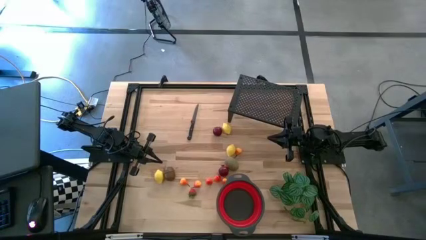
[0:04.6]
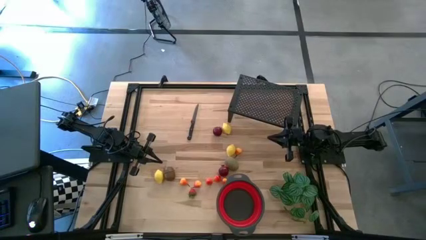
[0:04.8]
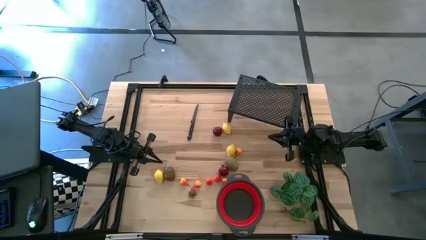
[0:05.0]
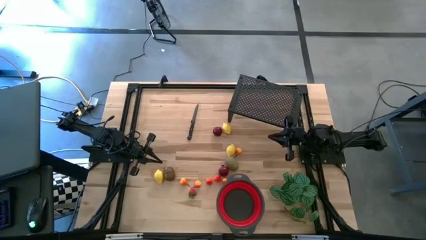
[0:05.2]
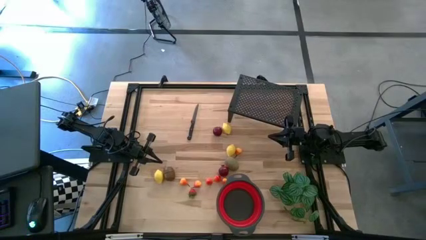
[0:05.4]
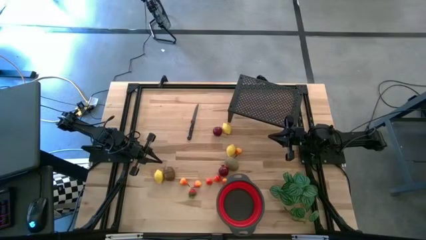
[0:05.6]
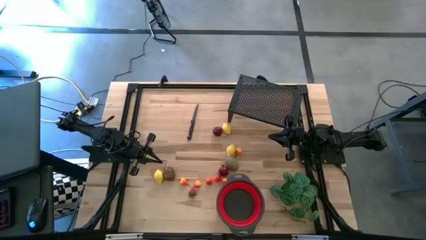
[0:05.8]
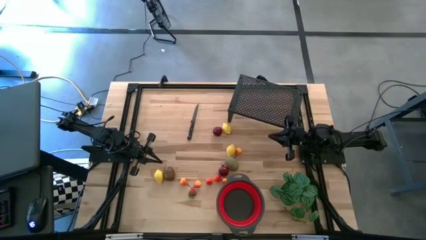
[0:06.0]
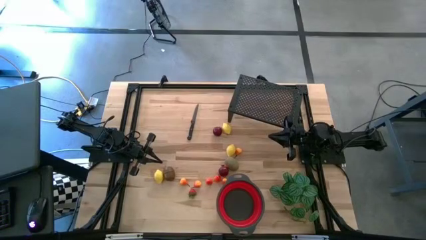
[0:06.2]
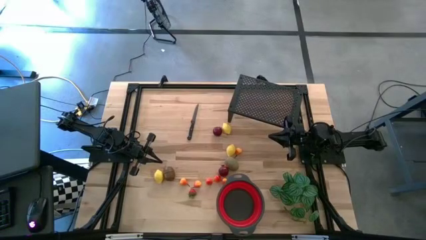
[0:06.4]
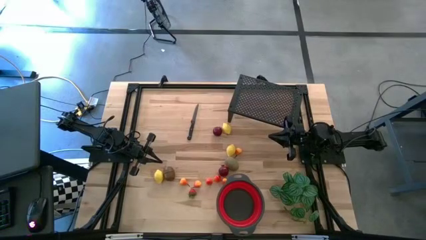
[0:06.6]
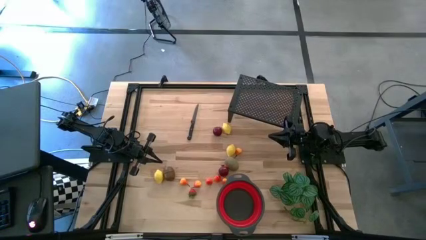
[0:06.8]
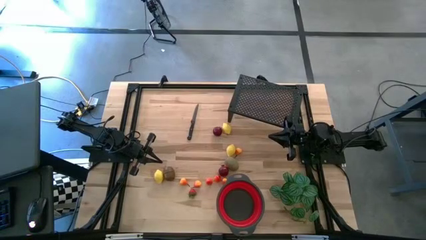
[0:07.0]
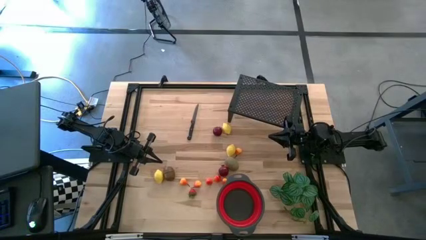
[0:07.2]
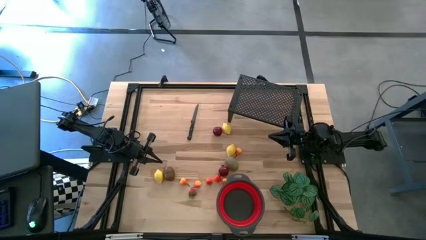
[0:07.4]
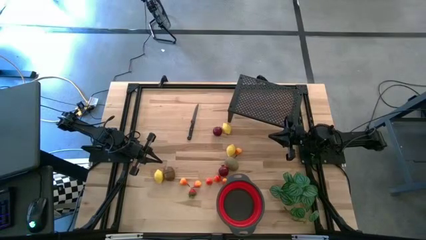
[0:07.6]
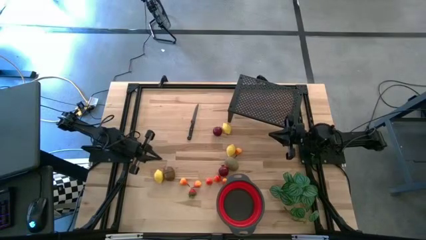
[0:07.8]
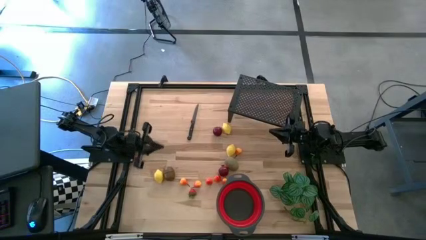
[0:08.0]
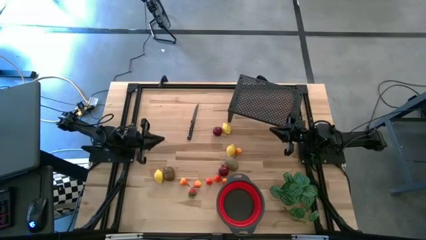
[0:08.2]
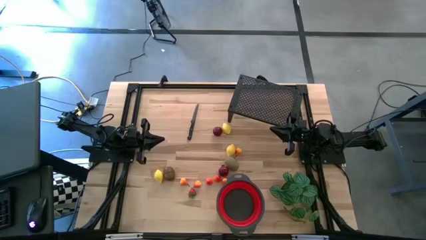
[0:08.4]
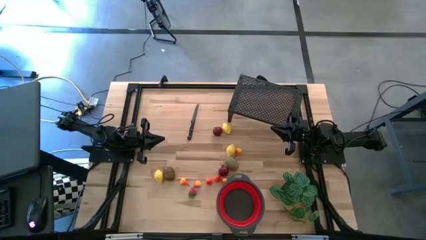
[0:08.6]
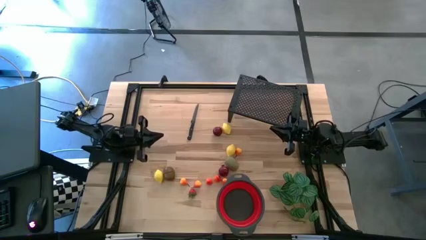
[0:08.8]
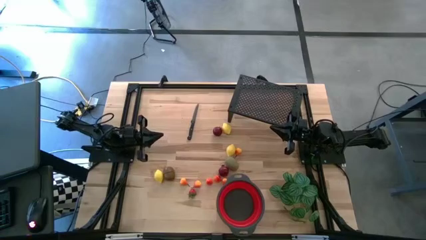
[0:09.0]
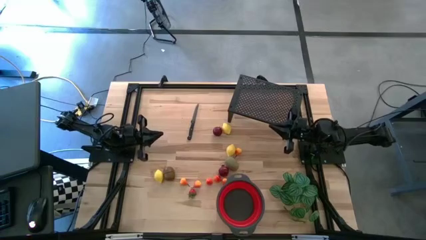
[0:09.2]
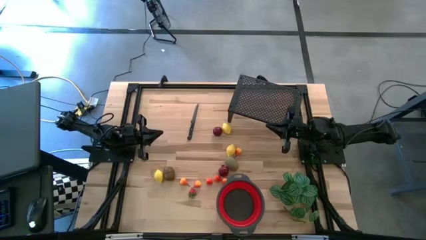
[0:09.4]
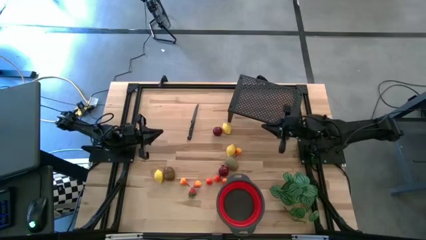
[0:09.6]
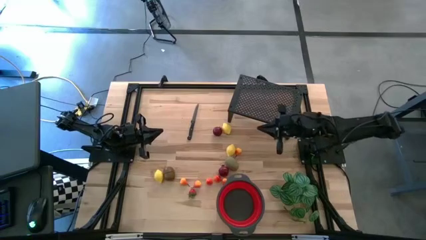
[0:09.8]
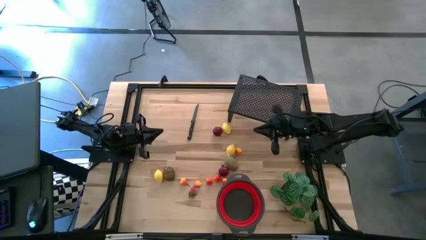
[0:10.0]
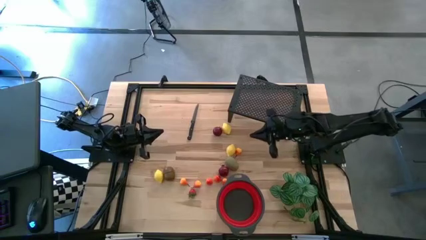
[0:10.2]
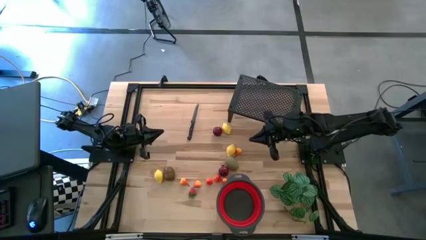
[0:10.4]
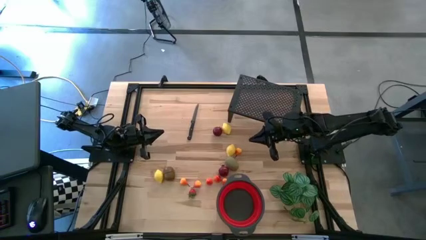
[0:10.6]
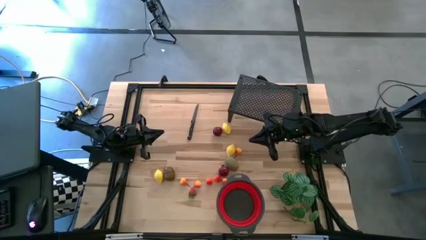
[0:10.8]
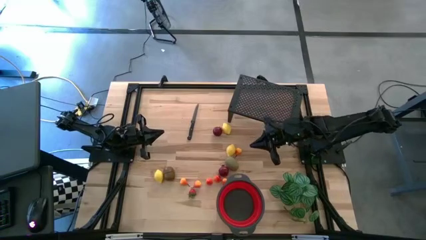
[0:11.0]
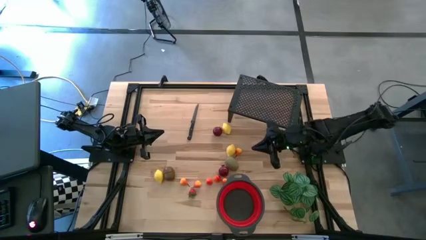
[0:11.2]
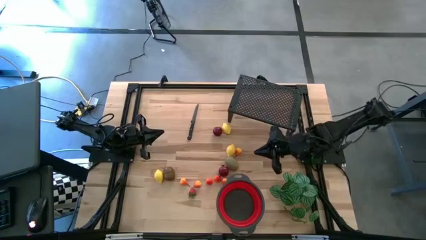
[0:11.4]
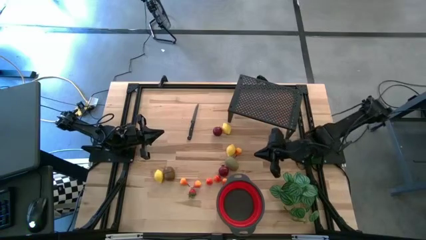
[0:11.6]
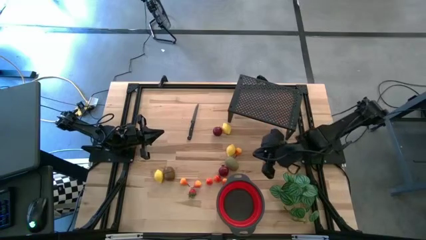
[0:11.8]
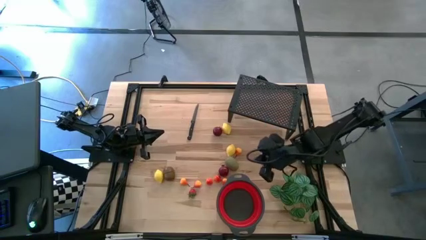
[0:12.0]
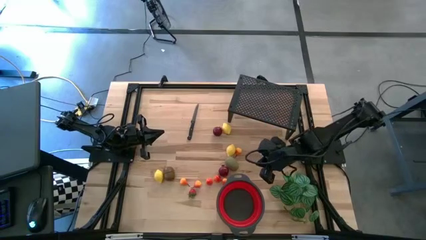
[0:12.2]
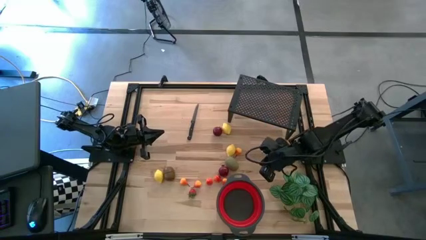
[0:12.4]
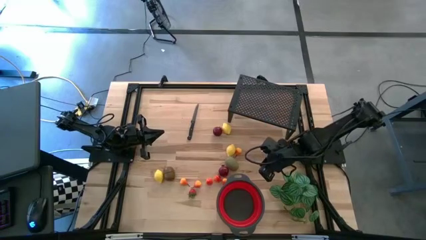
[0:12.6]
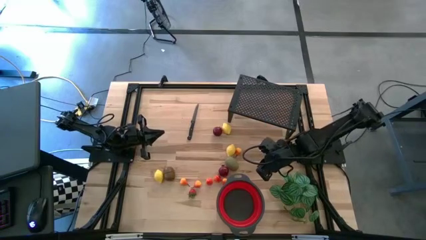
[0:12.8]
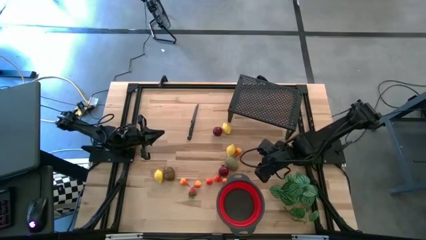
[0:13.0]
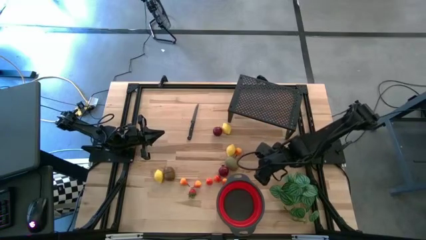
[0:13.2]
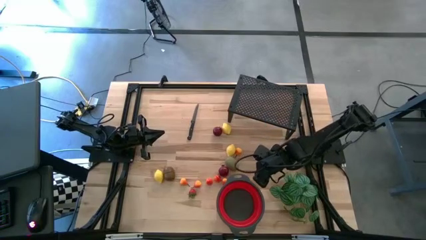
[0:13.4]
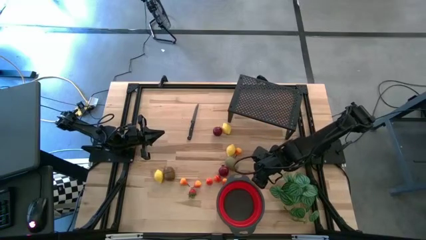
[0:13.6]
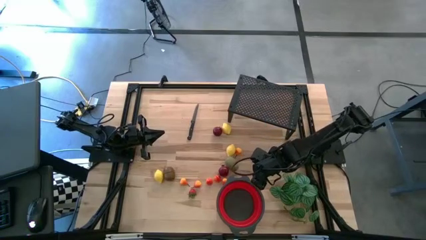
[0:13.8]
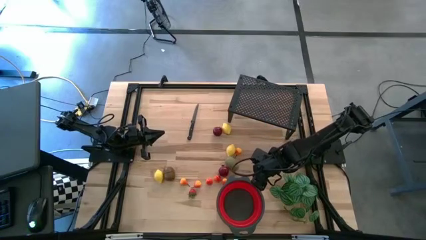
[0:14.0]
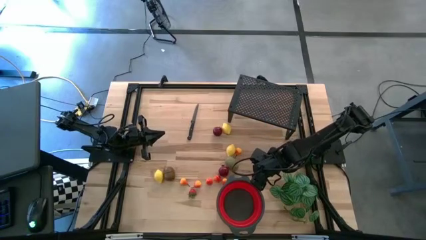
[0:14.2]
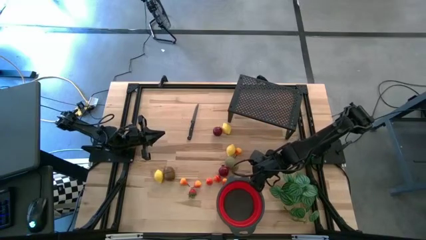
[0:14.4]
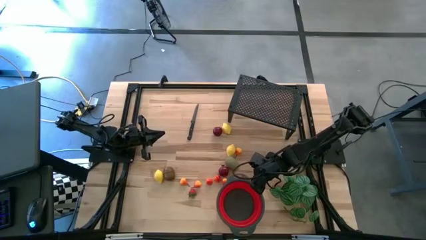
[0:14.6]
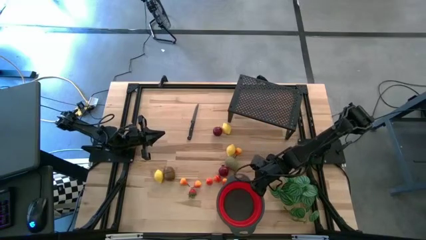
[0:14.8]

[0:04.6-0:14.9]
Task: Pick & Place Fruit
Put the red strainer bowl on the shelf
